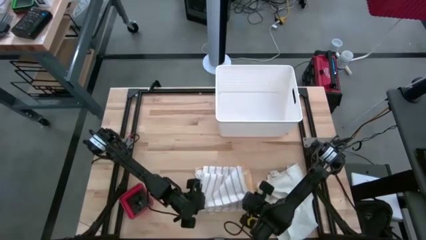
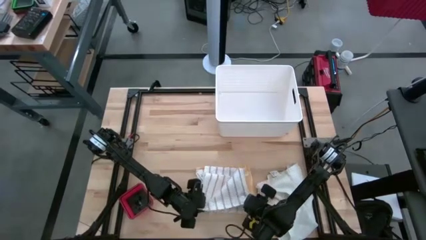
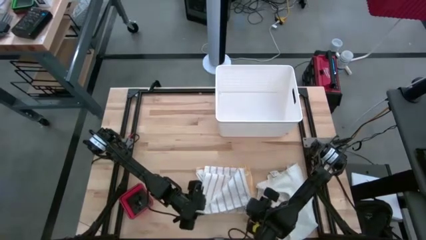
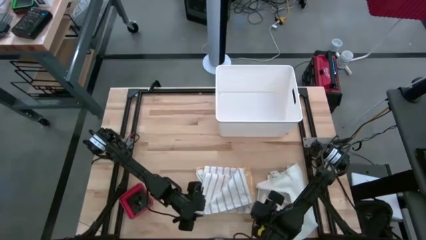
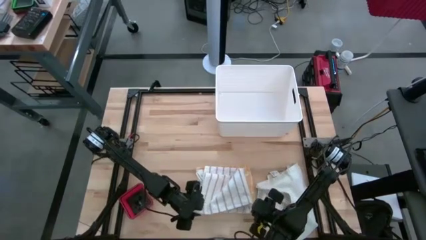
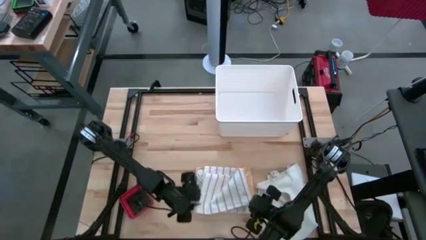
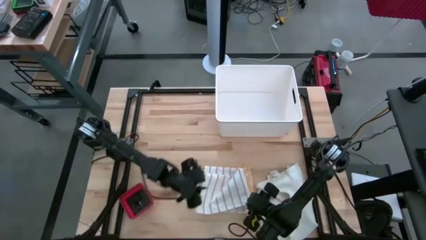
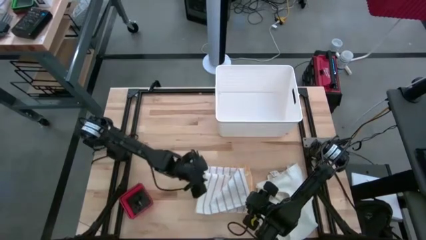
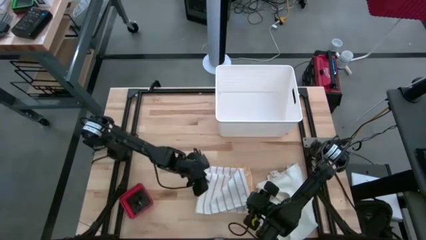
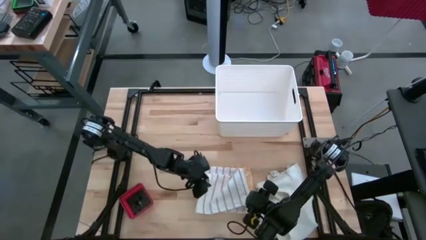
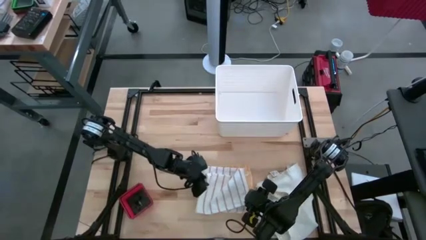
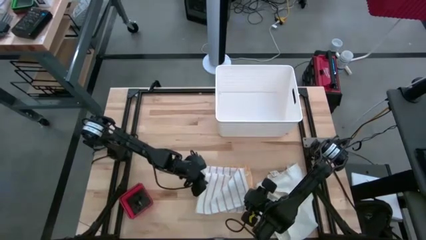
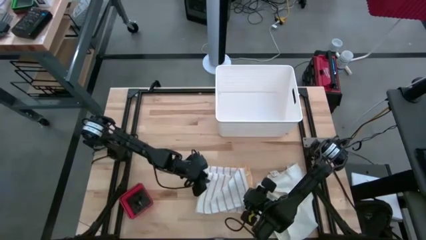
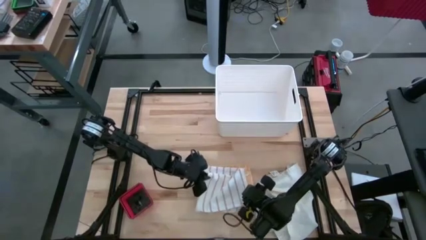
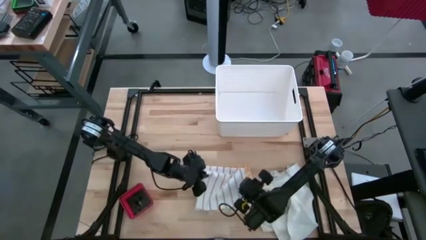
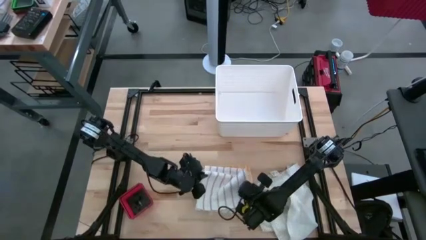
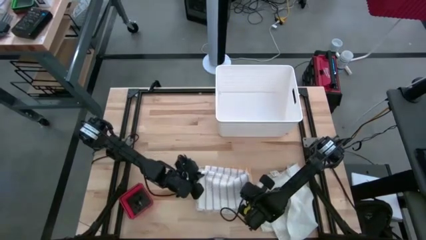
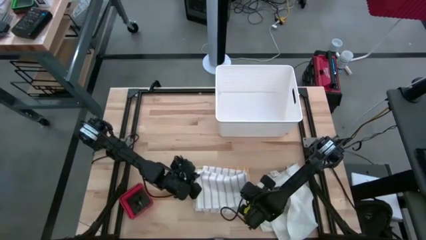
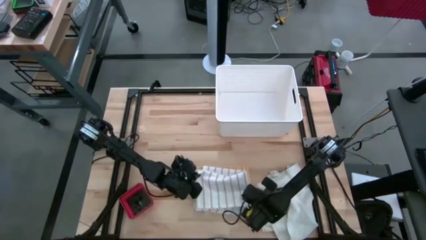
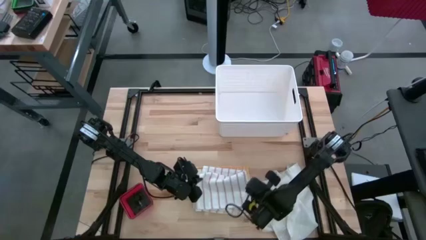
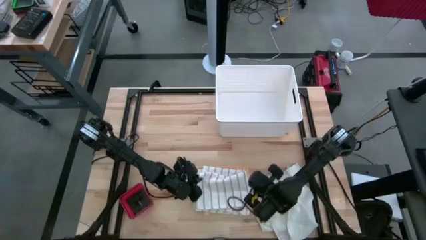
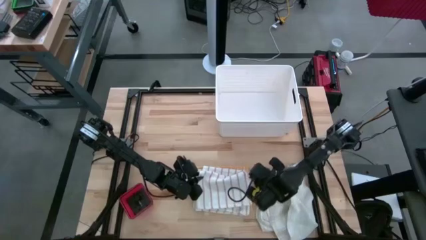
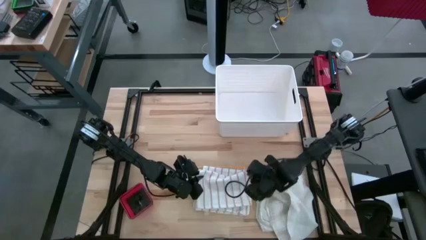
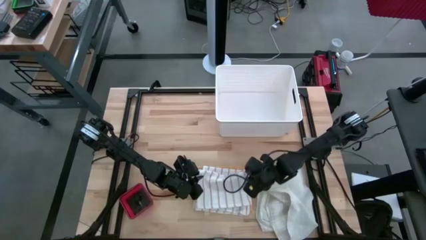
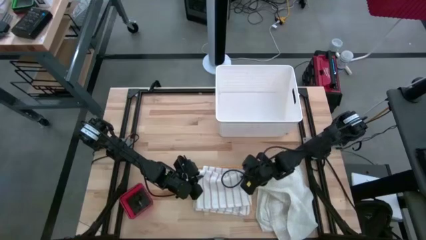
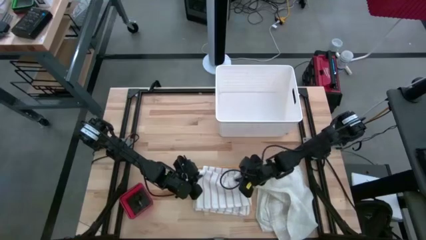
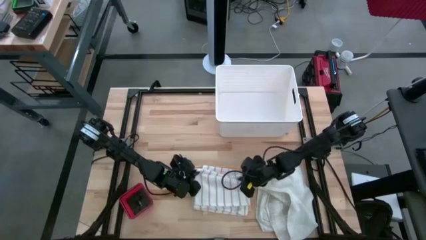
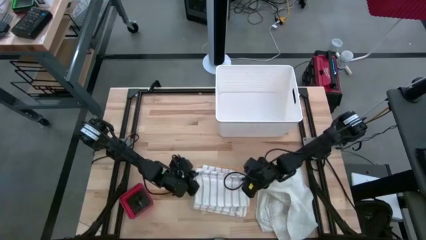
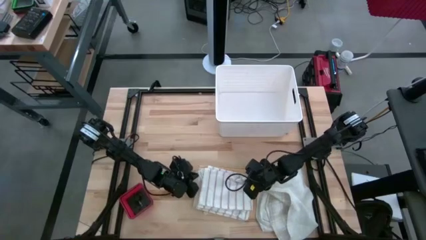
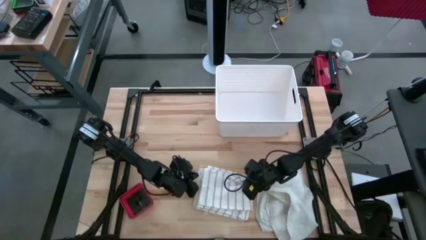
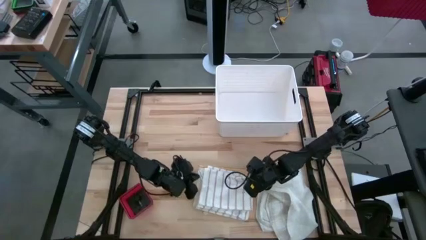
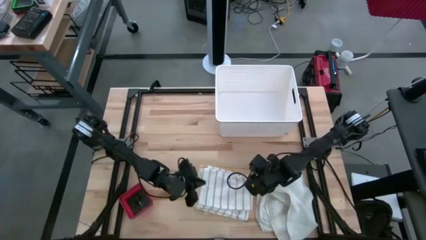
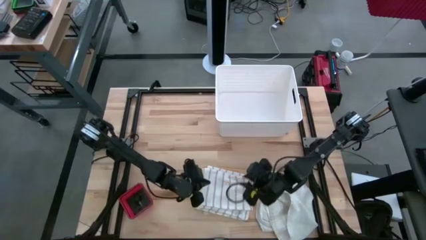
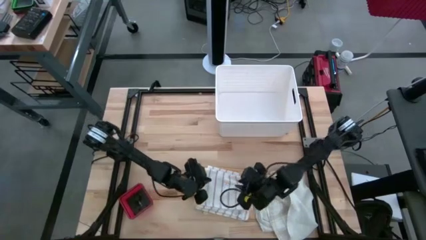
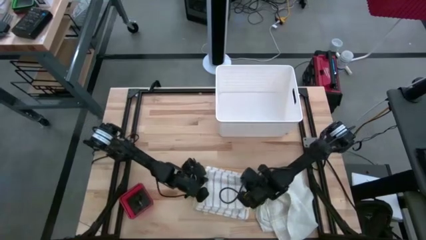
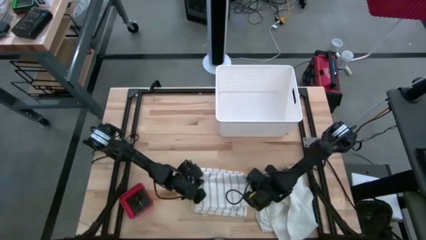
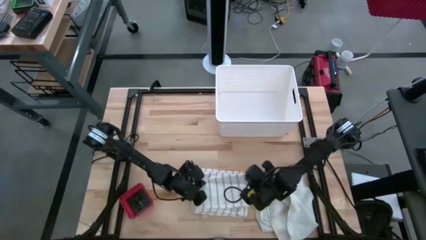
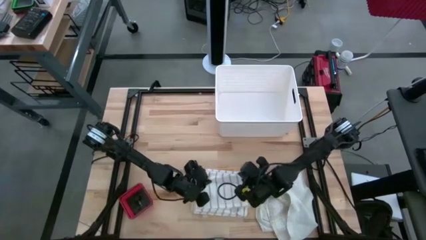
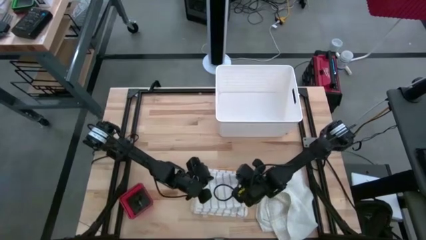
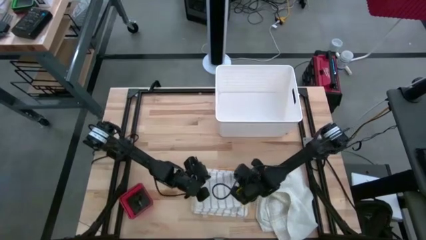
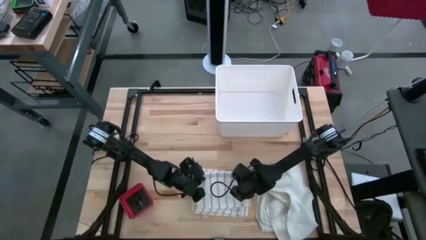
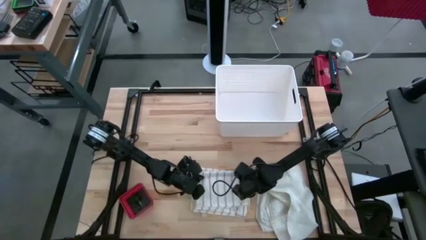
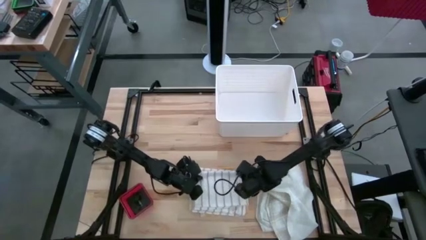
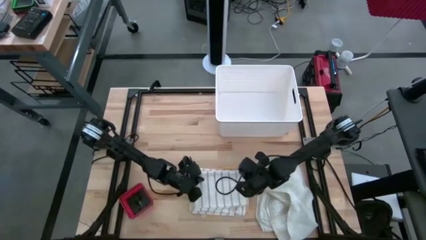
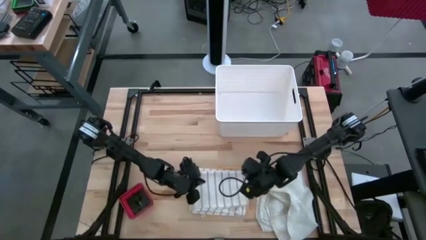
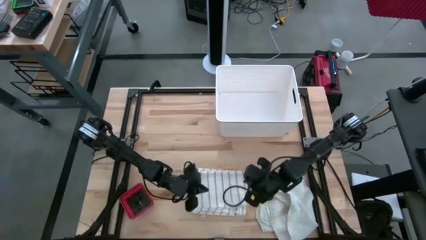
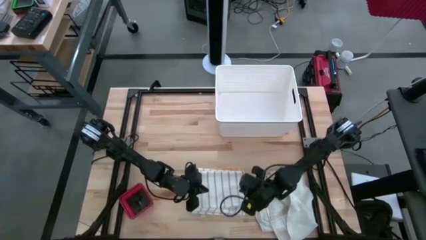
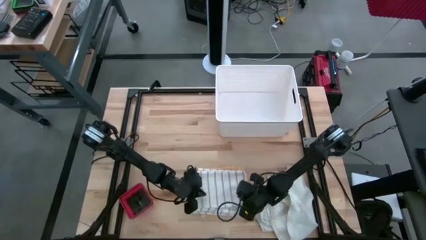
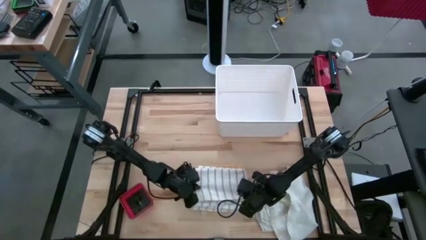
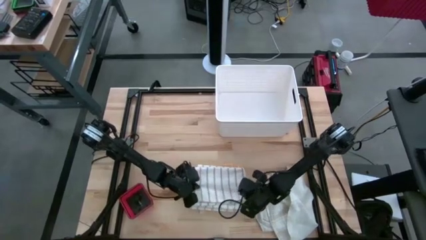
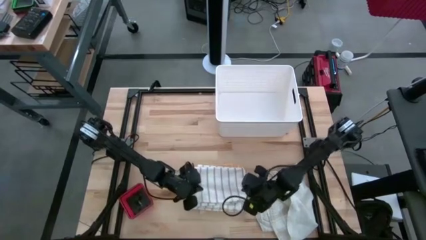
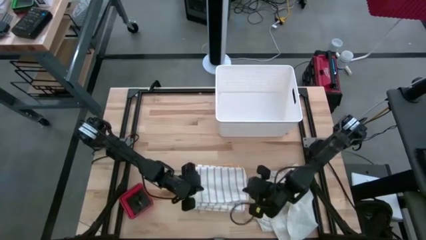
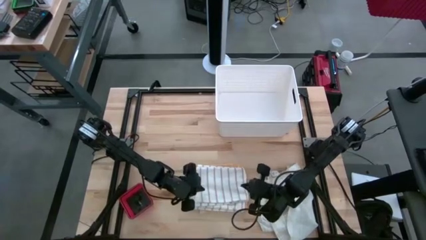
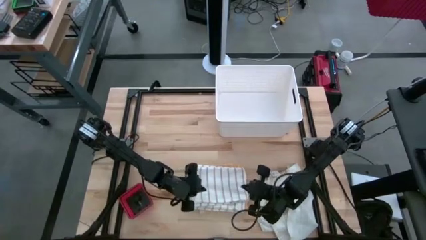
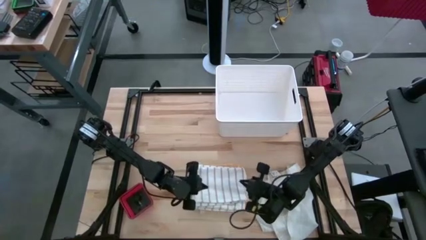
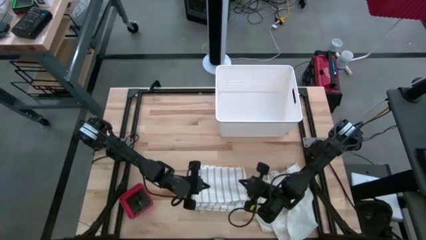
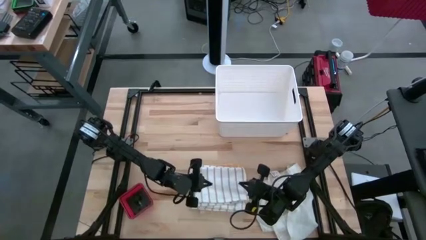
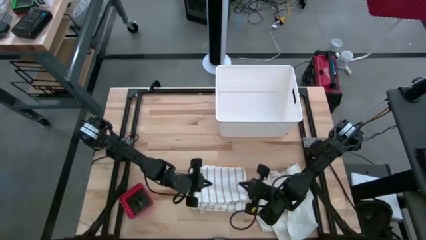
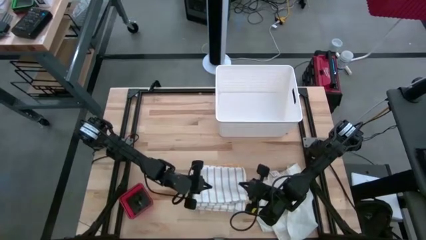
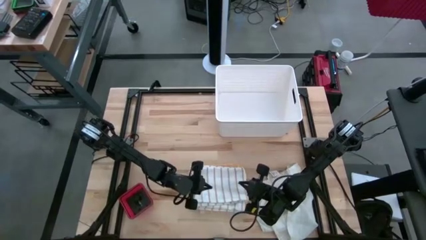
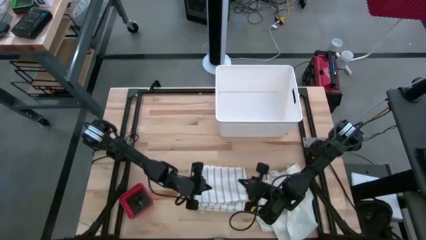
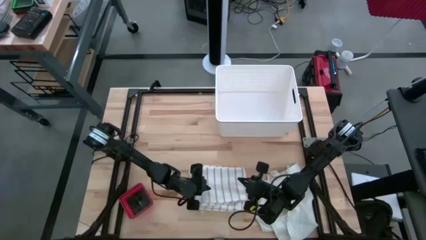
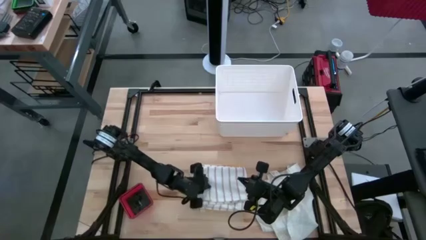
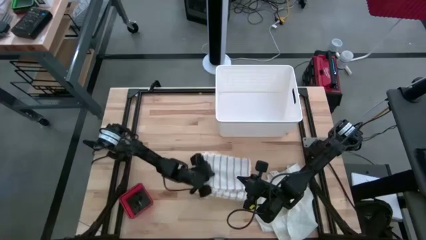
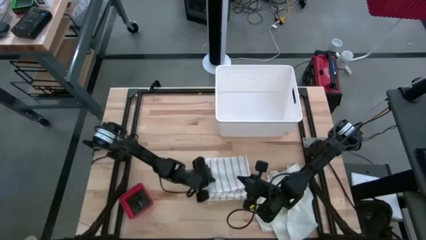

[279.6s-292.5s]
Task: Fold towel
Stack the brown towel on top of the yellow towel
